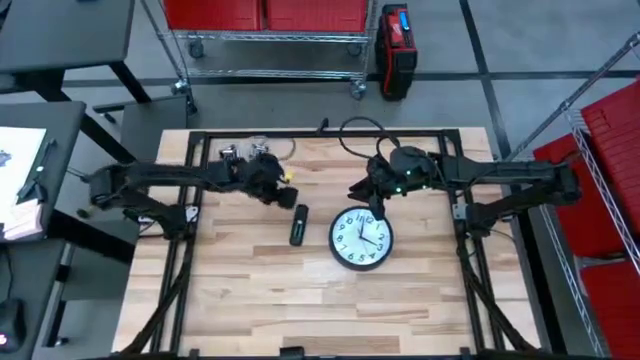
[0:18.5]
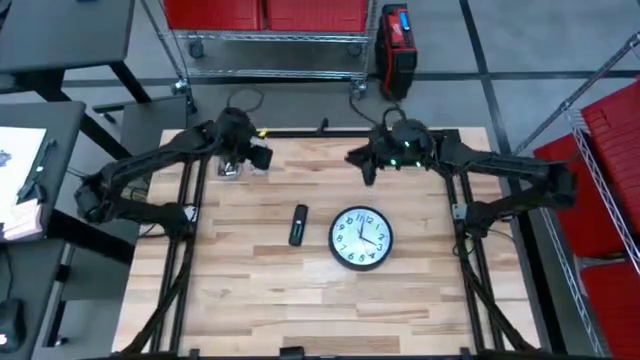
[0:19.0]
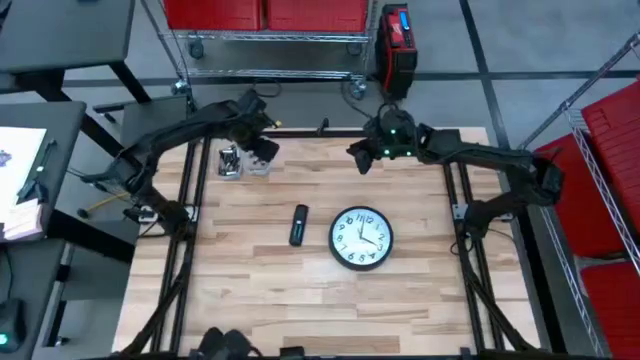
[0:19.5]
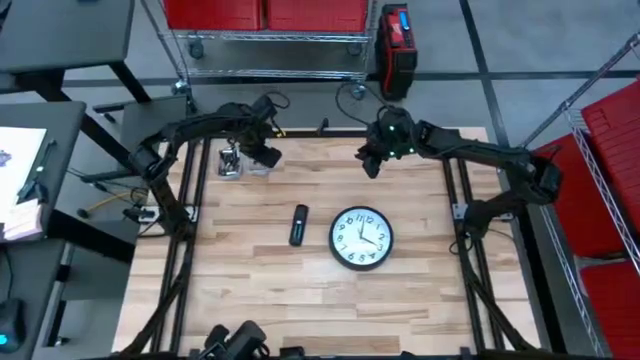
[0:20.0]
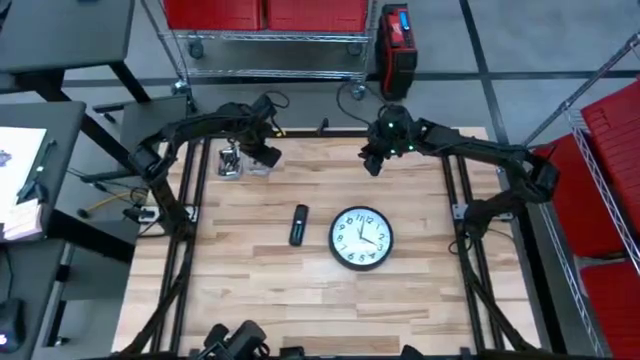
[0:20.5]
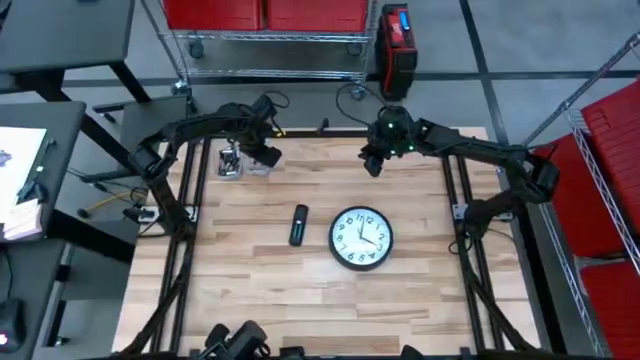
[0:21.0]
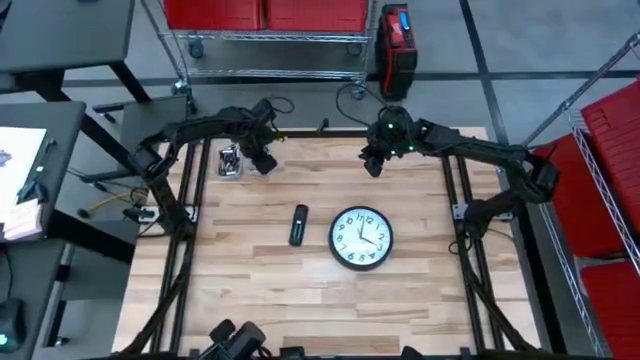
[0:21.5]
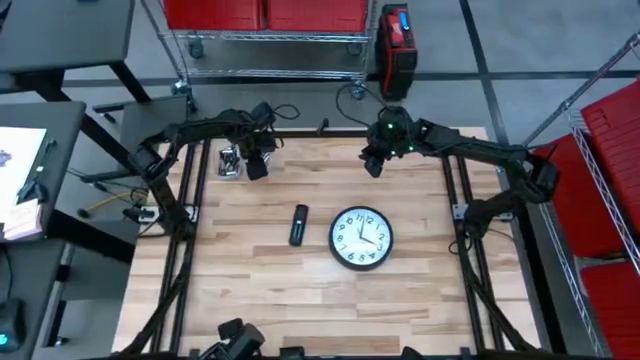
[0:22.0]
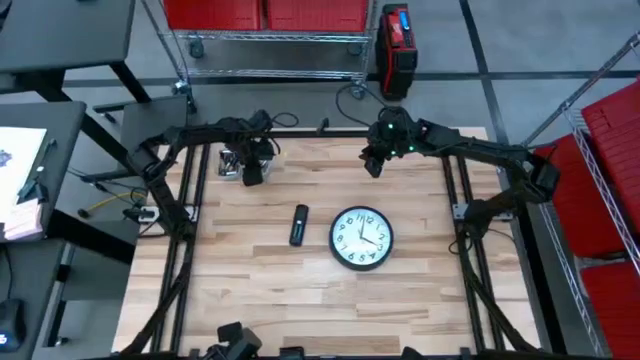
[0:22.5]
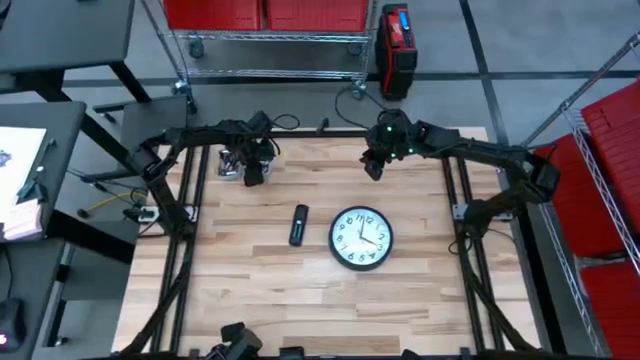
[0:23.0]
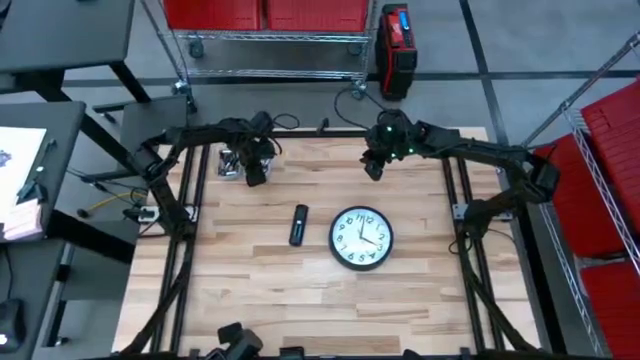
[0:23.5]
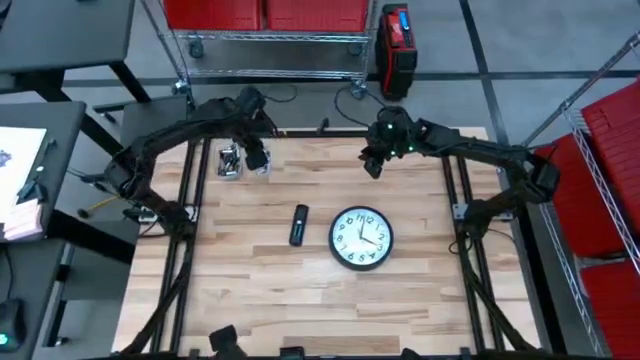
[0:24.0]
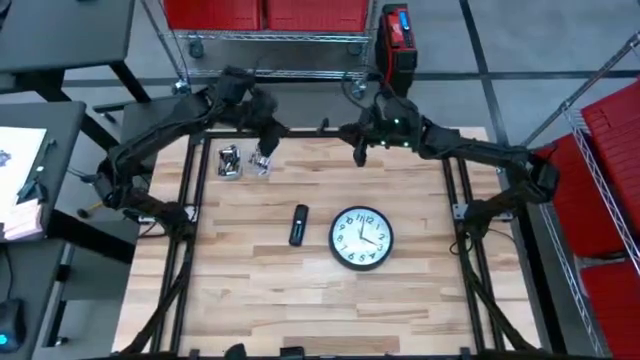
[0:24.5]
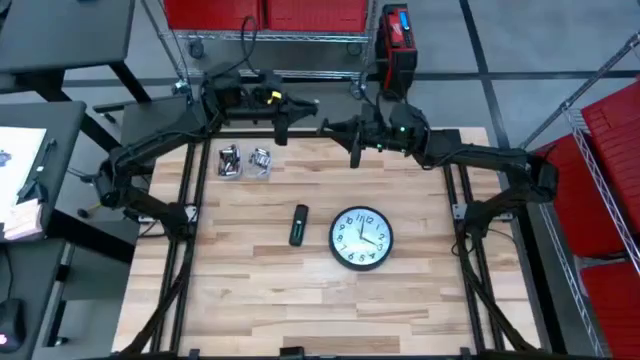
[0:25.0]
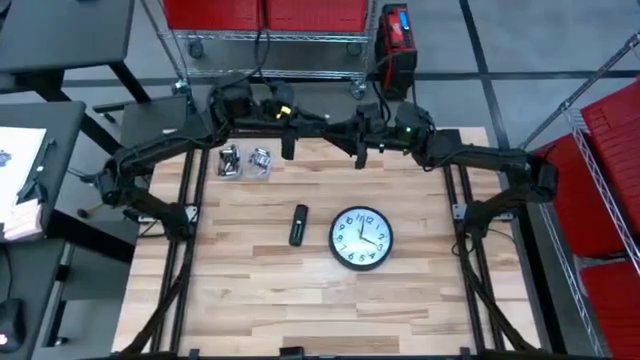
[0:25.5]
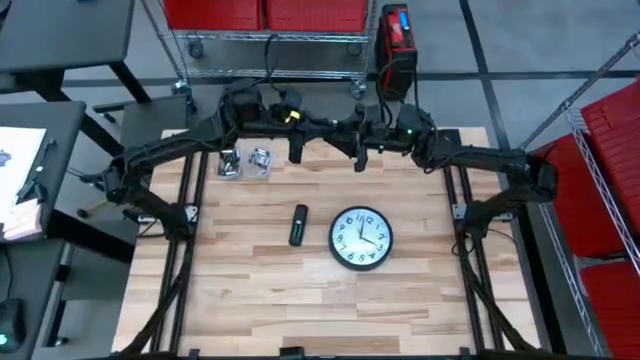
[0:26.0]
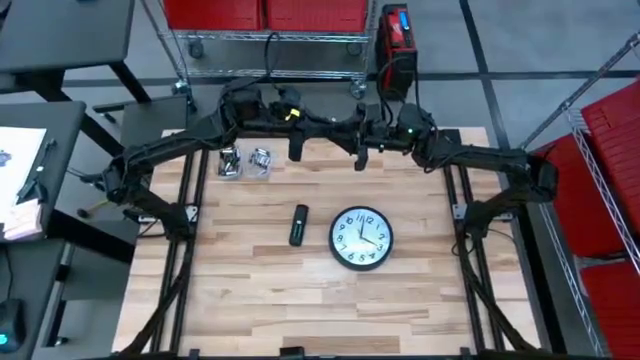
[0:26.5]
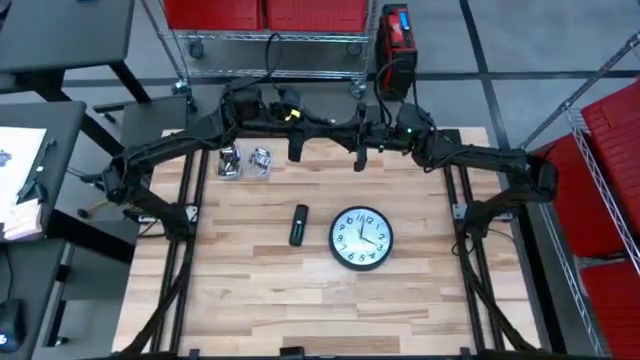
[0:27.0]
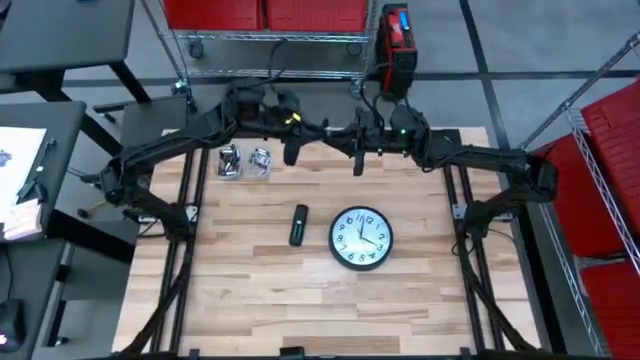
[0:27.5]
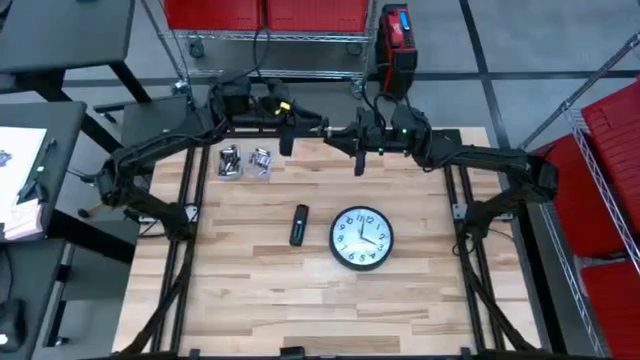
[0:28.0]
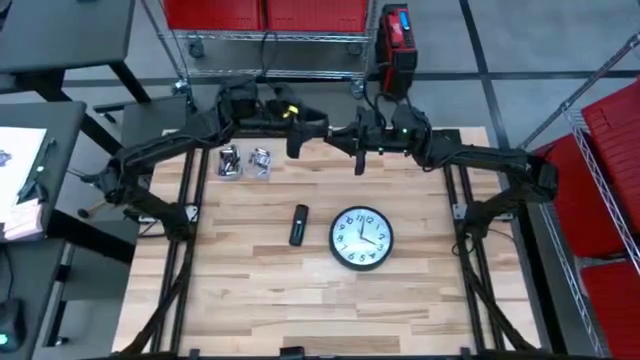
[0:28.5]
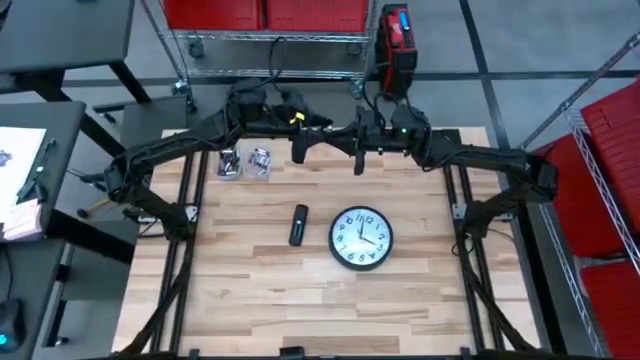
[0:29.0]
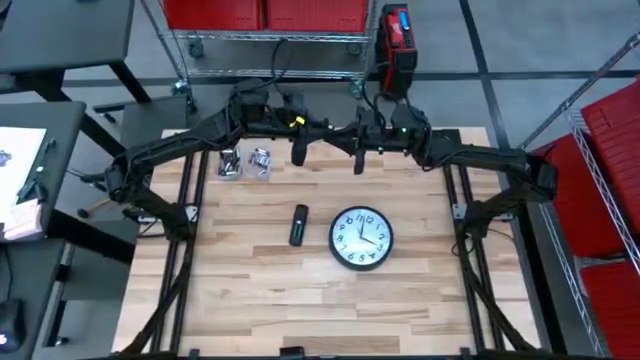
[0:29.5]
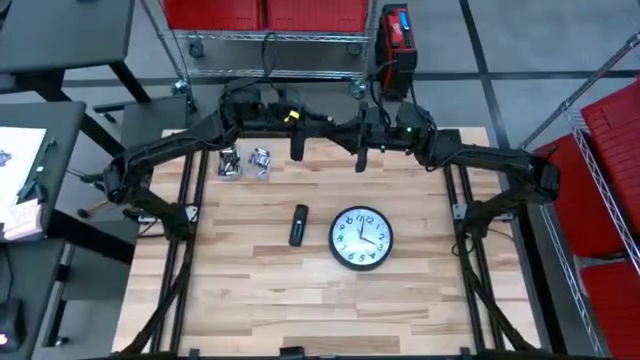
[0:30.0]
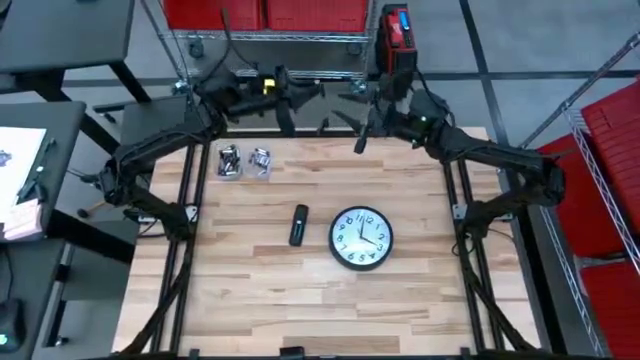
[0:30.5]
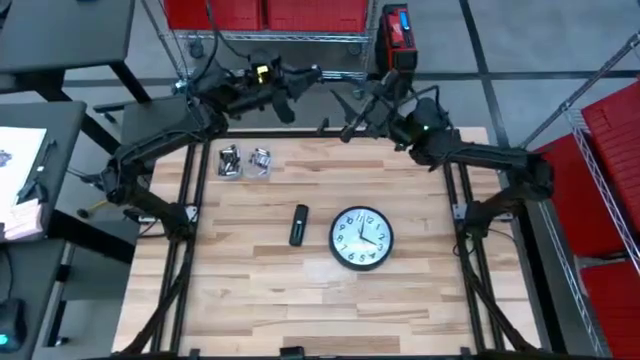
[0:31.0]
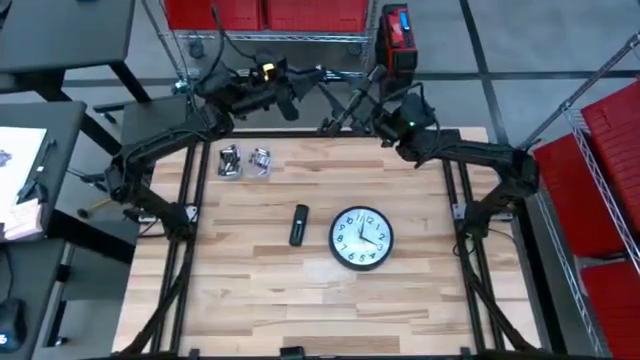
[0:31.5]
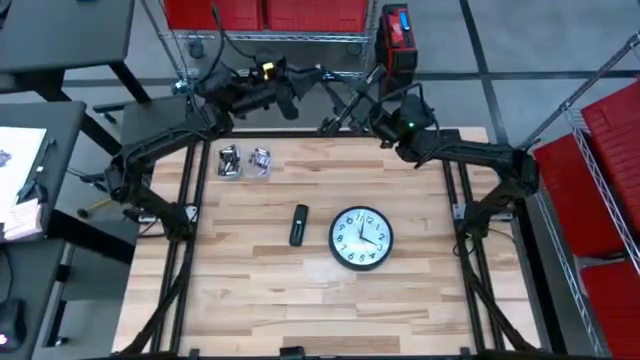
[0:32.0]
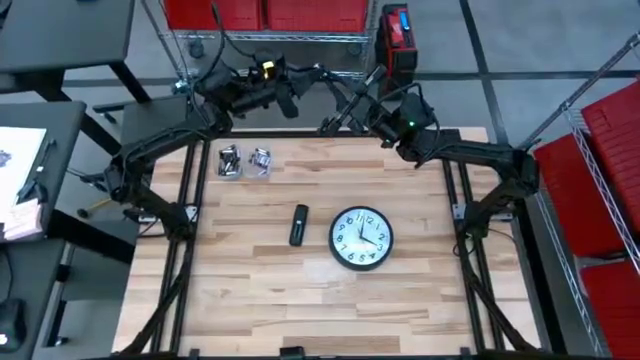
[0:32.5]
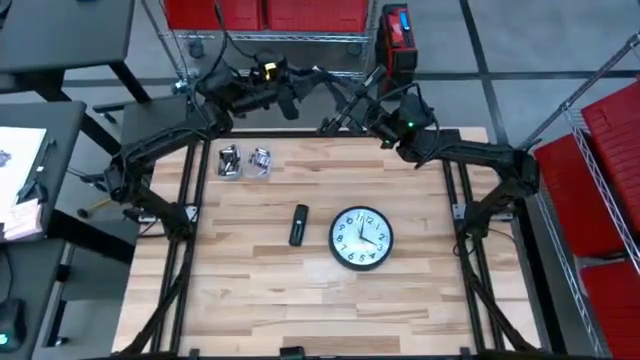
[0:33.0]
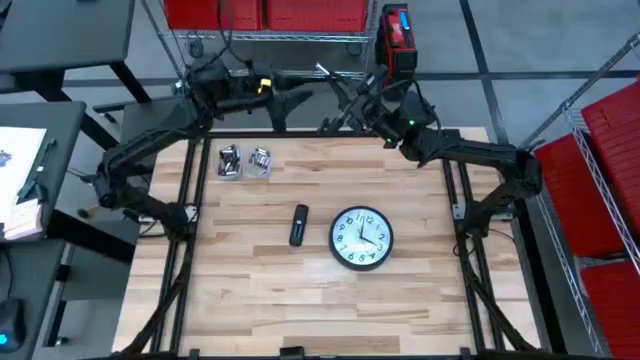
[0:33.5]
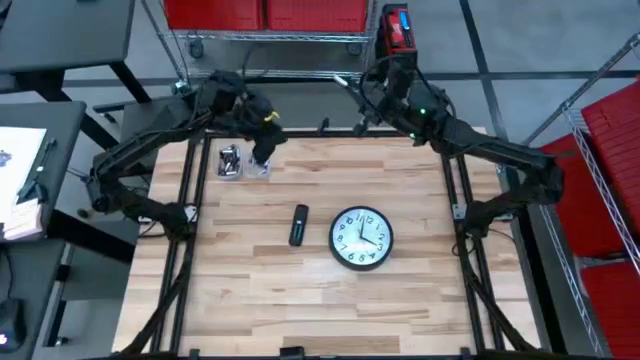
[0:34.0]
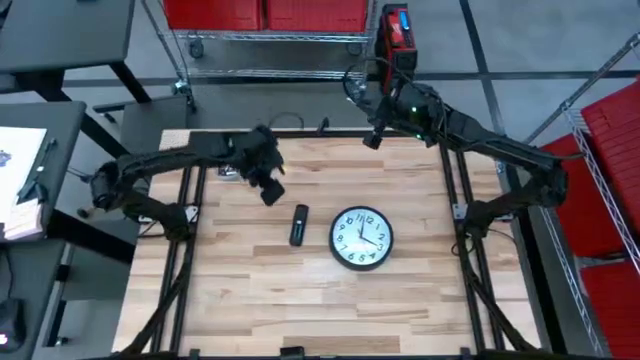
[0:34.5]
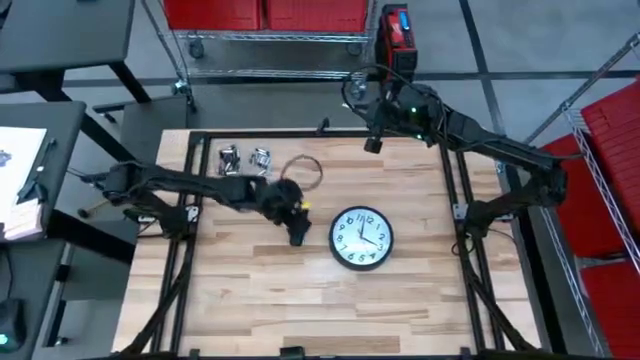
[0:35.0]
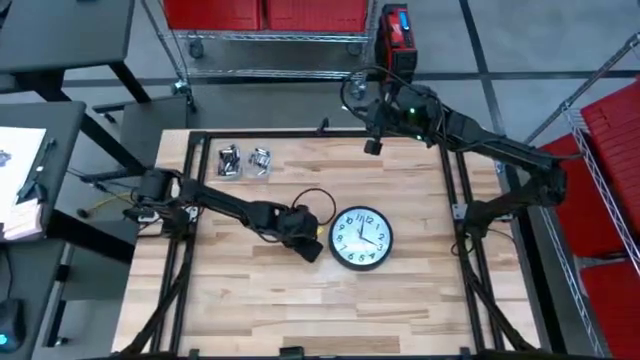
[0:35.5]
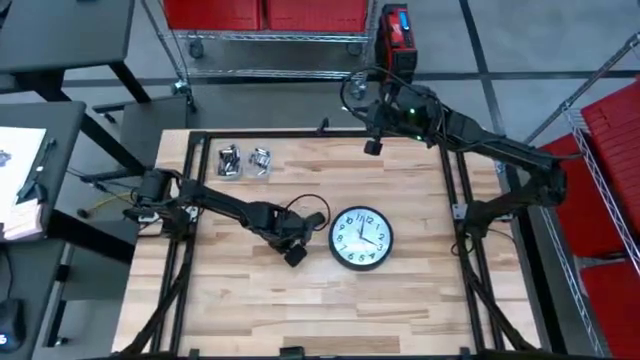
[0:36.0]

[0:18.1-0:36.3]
Task: Insert battery
Insert the silver battery into the remote
